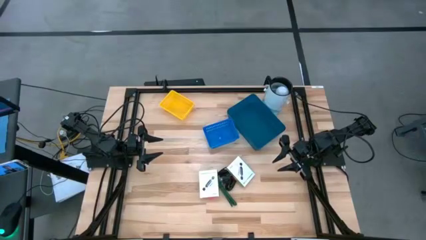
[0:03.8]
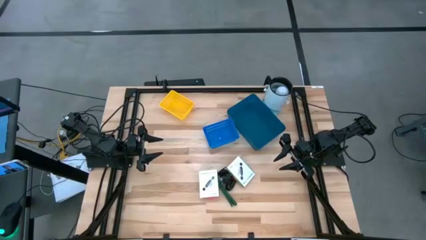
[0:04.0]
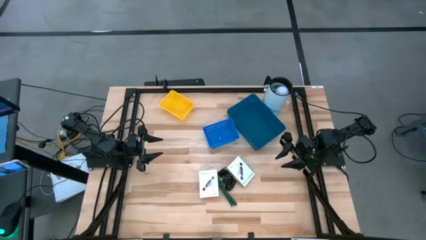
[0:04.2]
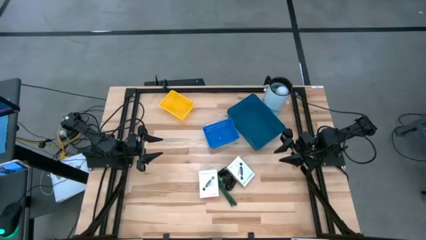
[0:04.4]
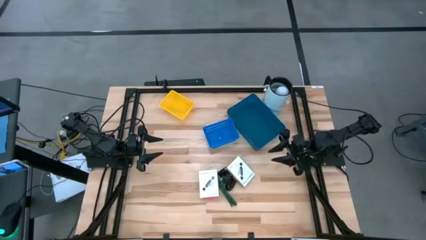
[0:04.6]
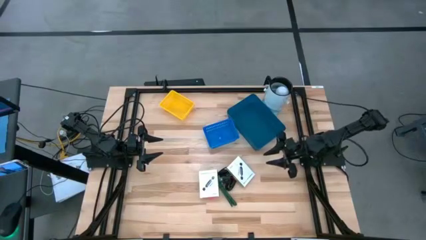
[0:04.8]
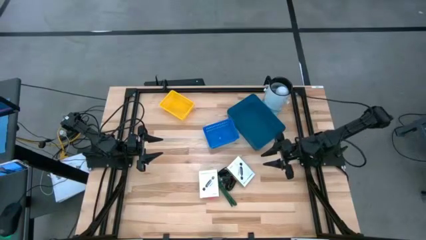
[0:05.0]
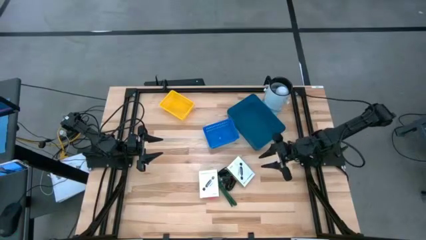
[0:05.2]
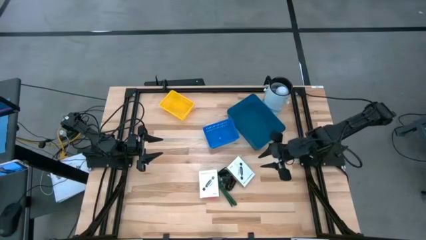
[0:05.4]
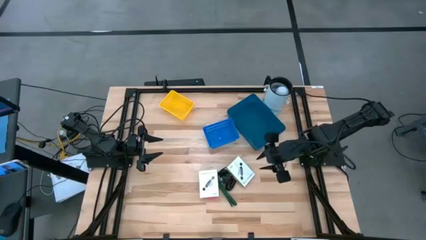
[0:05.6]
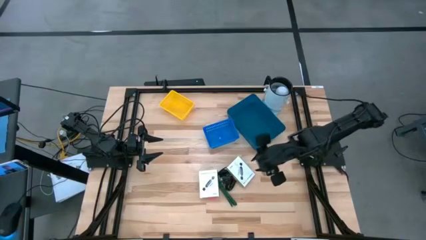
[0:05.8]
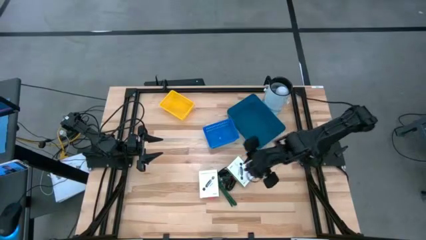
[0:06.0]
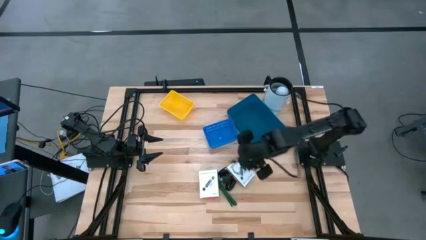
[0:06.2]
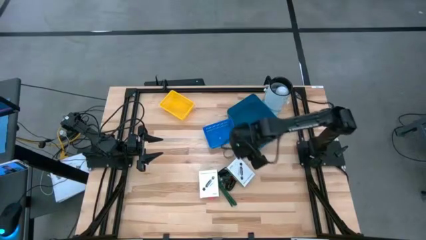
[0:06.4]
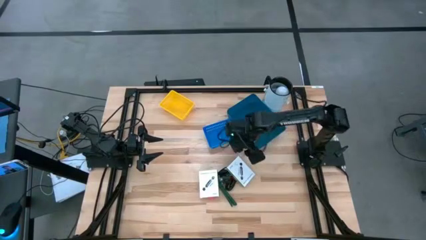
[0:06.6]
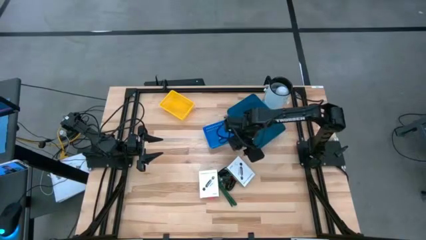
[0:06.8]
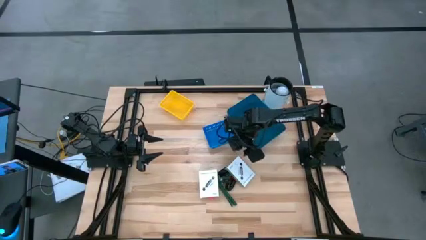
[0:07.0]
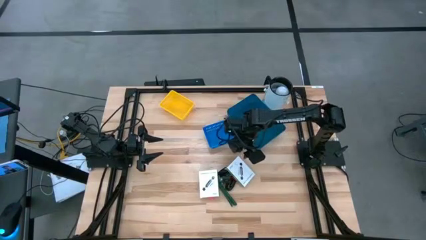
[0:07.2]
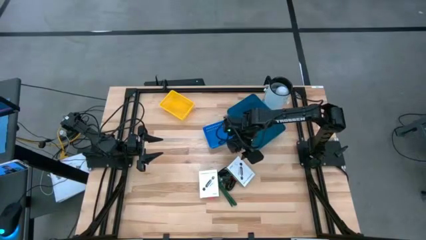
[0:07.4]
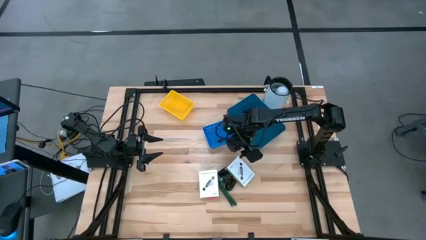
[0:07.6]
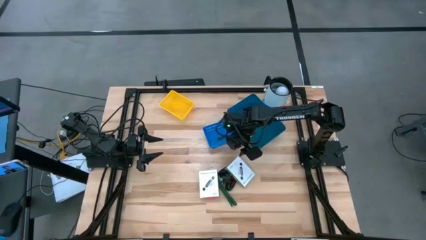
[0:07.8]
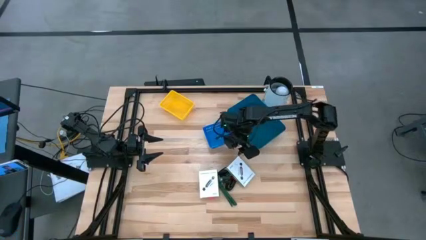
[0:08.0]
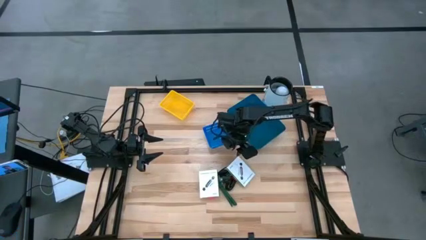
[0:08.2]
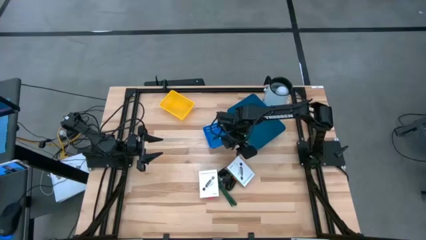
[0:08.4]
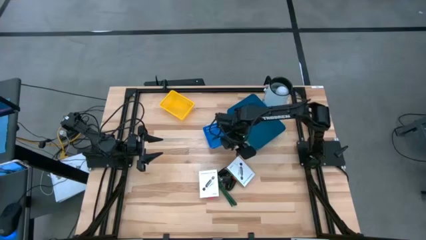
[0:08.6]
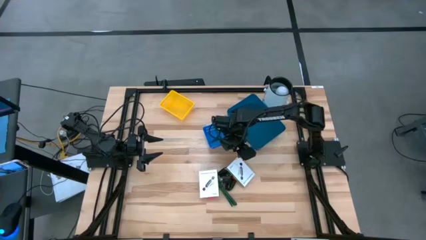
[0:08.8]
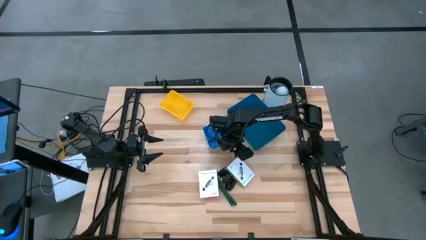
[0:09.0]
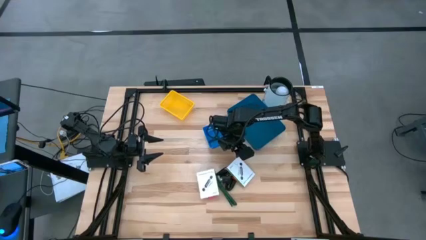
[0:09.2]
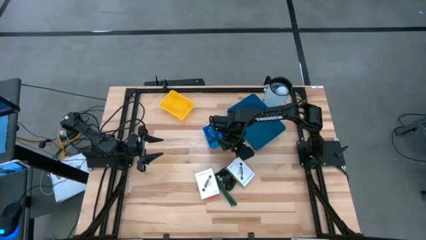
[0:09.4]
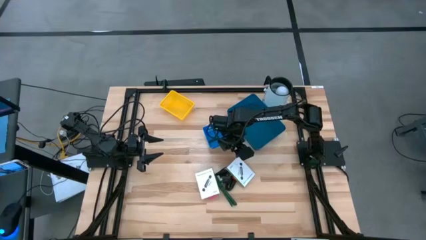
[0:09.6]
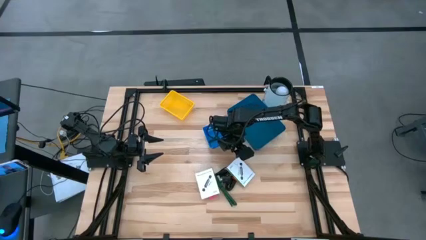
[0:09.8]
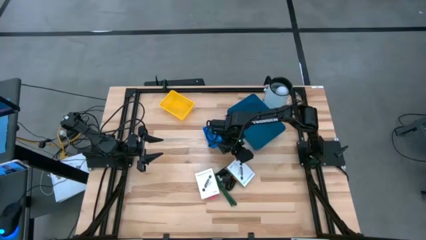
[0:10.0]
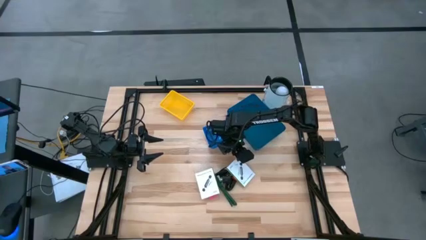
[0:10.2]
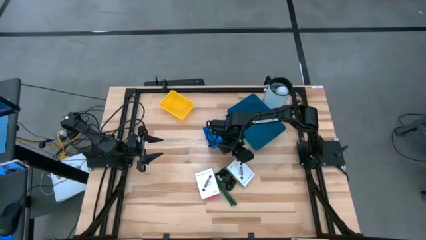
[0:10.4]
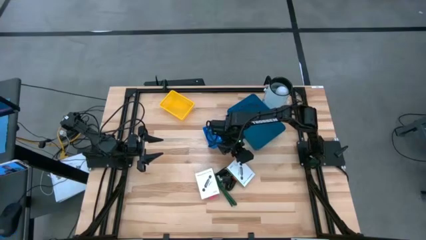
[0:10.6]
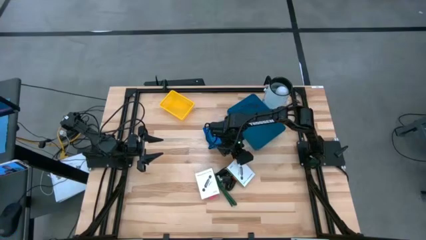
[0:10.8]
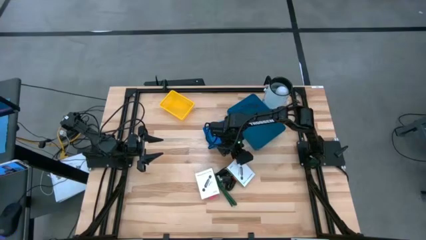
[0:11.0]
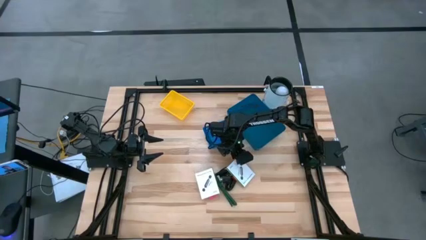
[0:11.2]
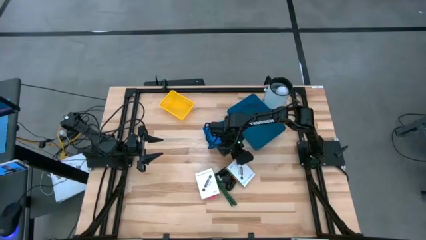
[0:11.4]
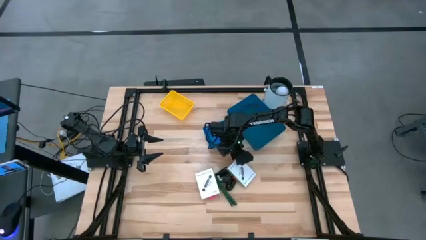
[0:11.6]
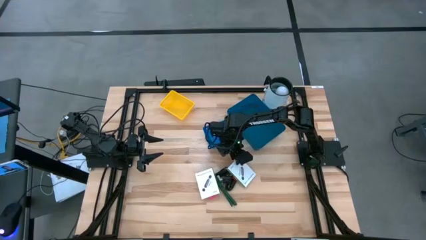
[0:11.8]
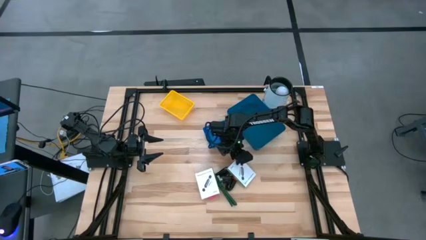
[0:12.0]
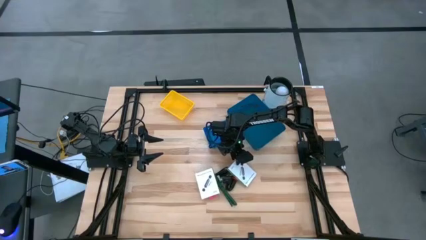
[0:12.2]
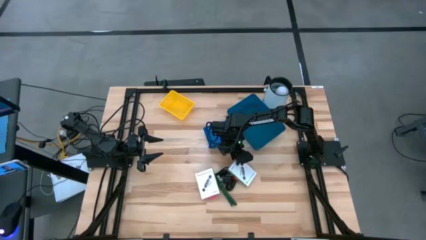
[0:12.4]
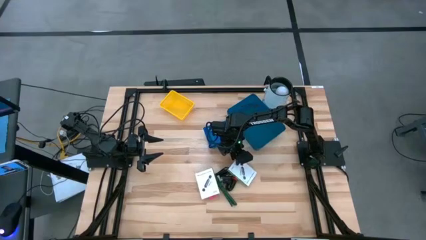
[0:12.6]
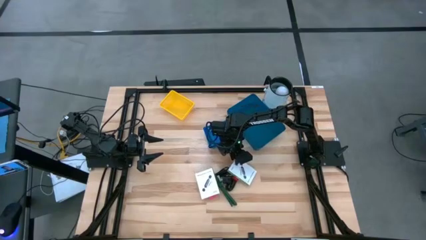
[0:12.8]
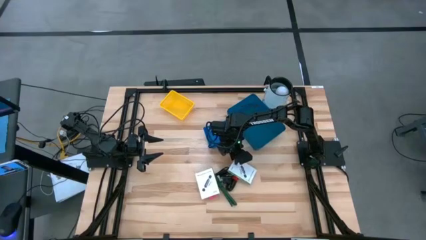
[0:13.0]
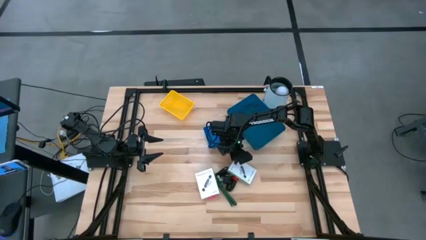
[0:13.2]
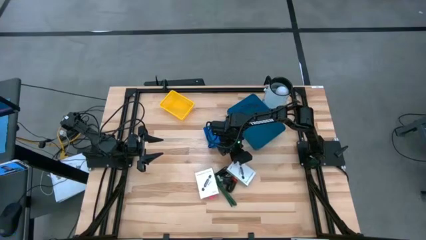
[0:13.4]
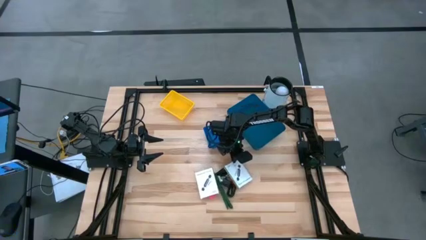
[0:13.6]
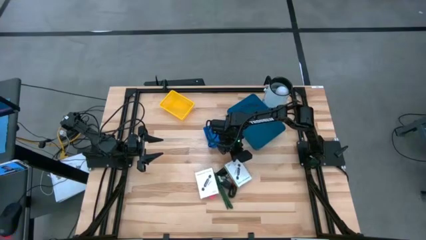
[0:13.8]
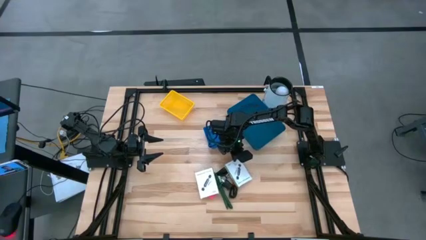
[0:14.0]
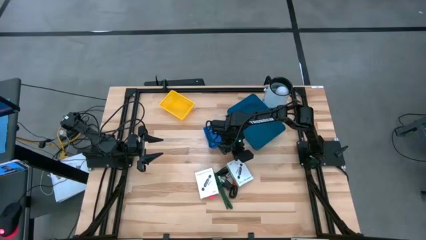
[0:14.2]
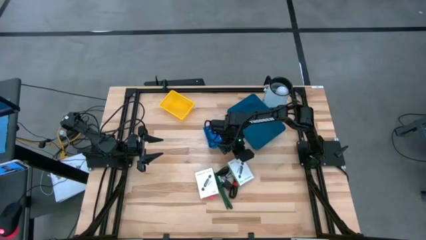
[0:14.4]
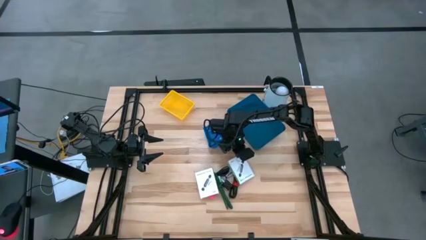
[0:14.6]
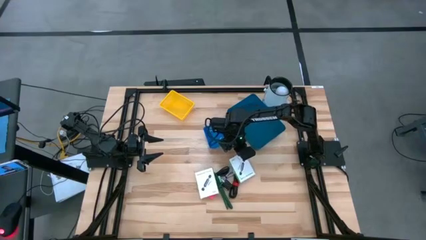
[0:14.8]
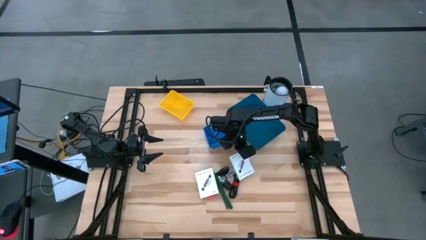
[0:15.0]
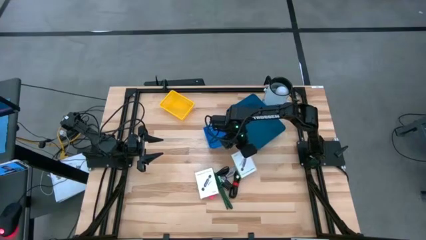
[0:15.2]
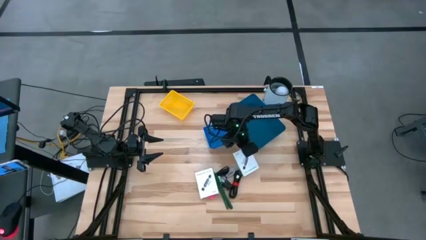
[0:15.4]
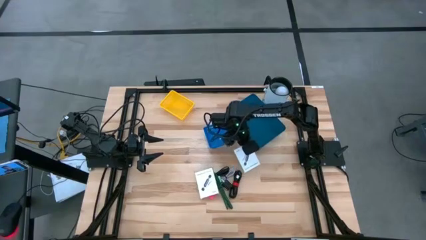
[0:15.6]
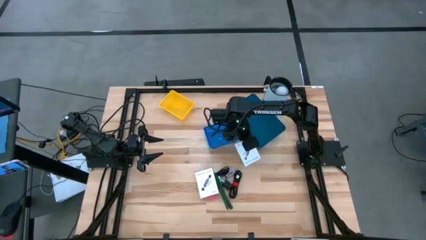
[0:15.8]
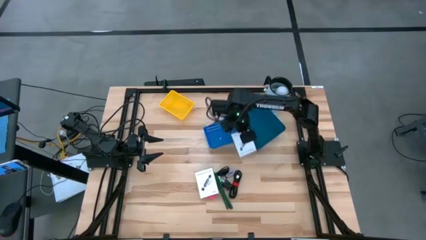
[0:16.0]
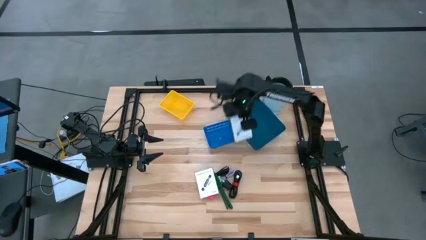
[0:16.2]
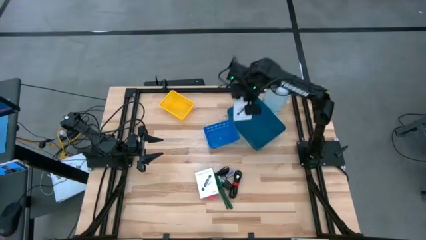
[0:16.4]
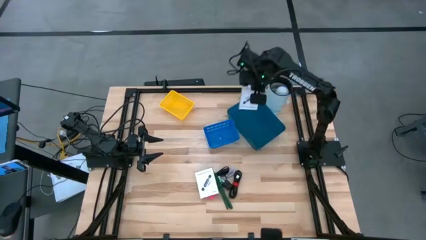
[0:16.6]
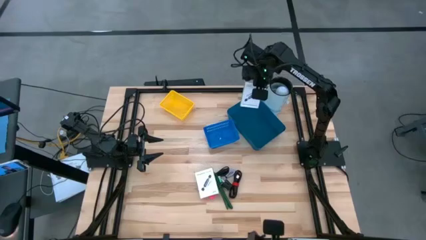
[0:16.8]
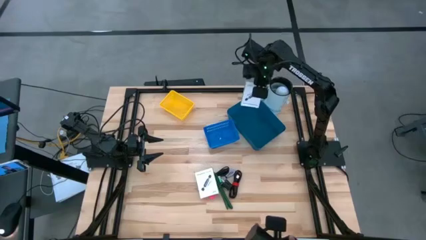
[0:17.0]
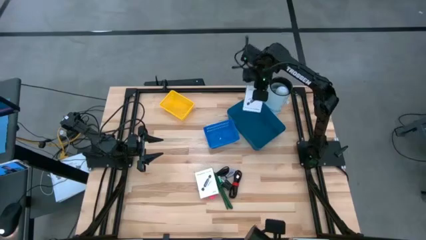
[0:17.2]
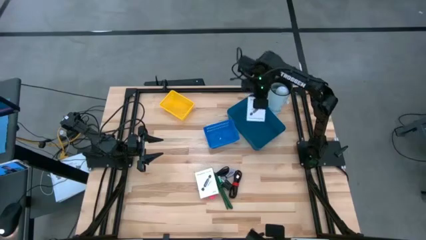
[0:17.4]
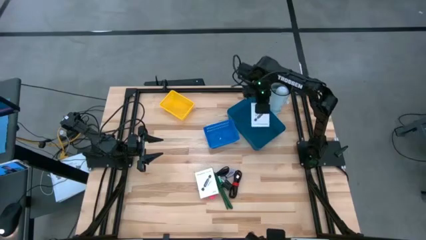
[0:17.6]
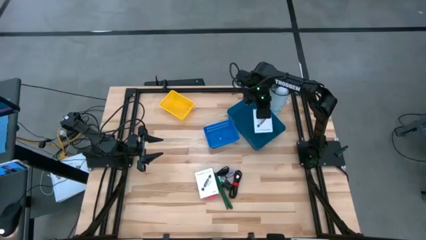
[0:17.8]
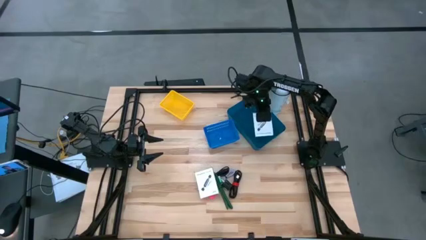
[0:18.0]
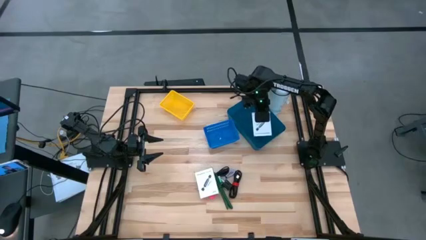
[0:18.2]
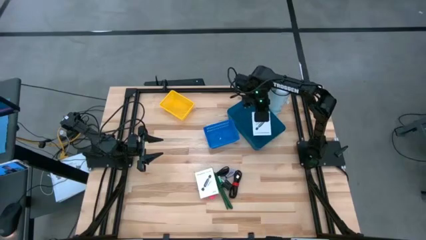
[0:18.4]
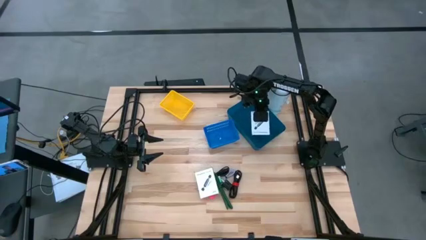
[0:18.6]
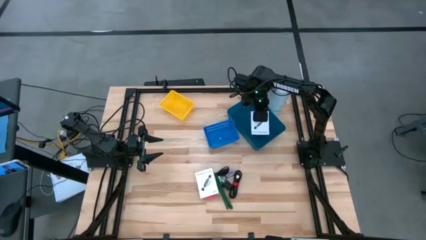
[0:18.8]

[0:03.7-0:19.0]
Task: Pick and place items into bin
Put the right SD card reader box into the dark blue bin
